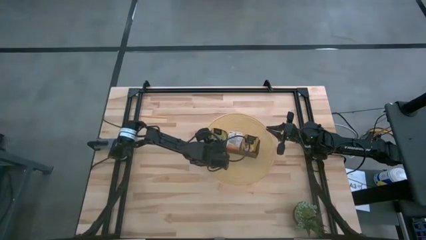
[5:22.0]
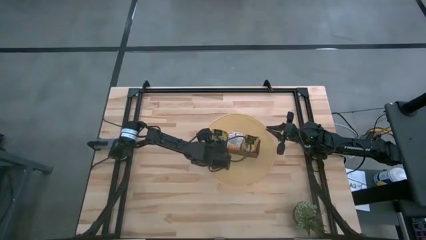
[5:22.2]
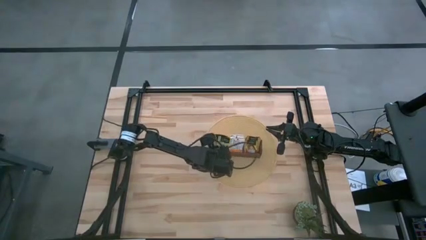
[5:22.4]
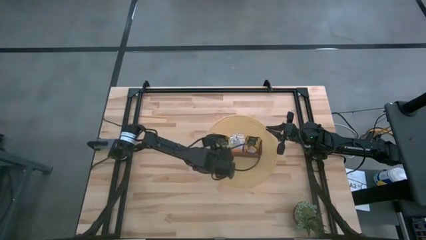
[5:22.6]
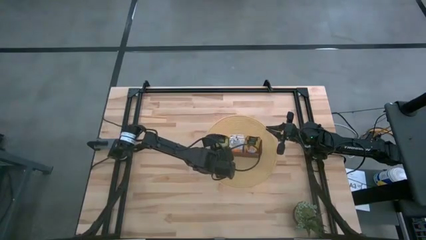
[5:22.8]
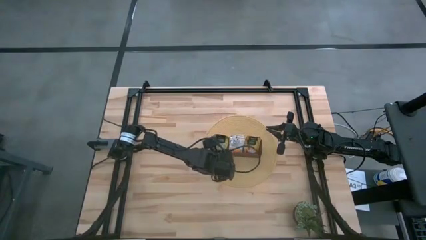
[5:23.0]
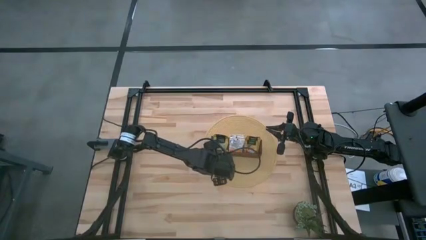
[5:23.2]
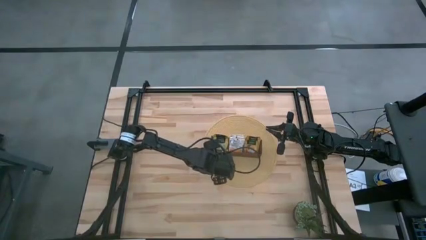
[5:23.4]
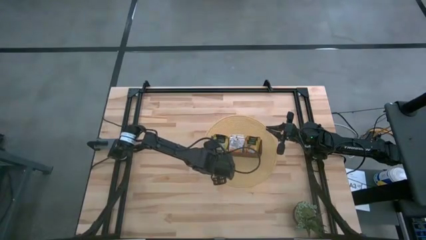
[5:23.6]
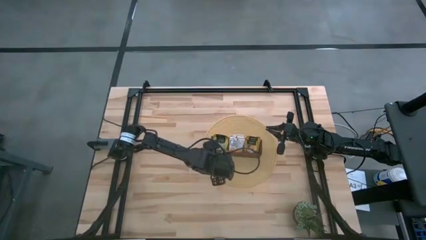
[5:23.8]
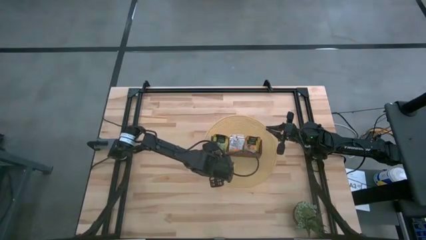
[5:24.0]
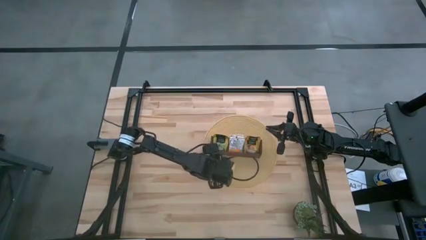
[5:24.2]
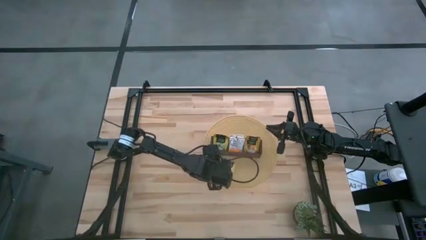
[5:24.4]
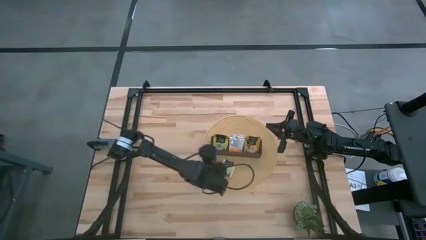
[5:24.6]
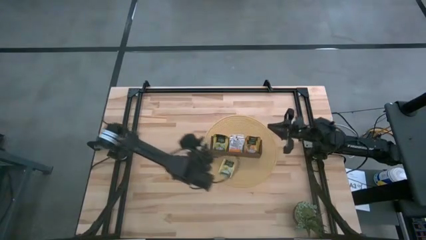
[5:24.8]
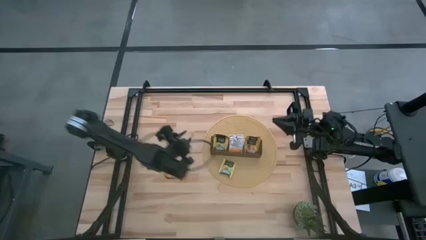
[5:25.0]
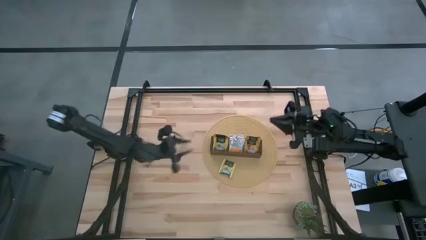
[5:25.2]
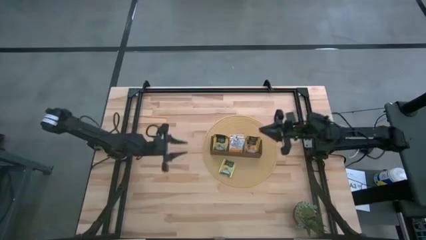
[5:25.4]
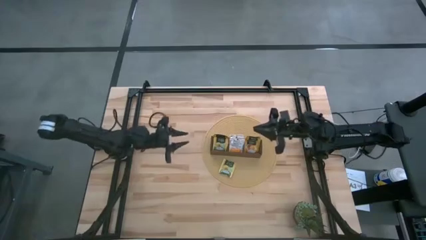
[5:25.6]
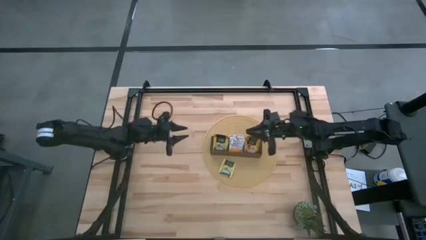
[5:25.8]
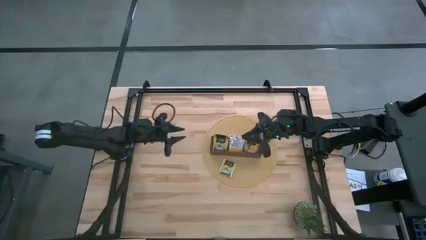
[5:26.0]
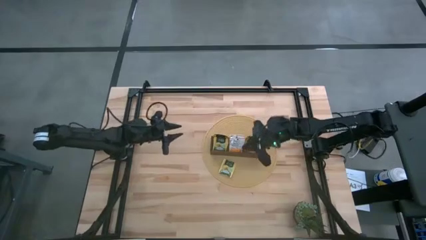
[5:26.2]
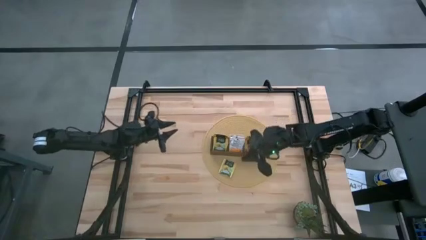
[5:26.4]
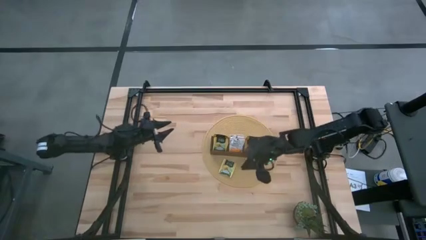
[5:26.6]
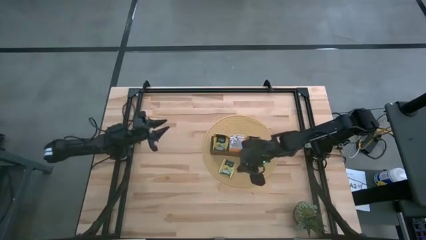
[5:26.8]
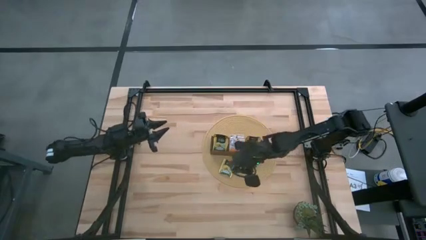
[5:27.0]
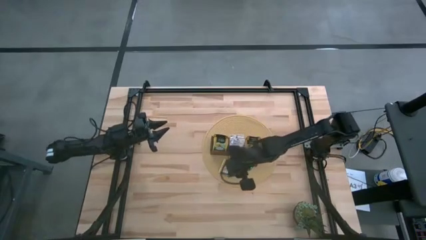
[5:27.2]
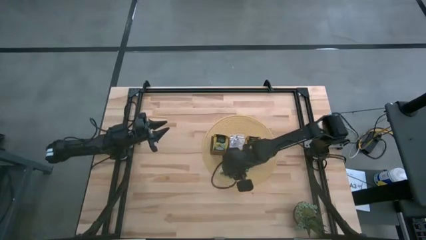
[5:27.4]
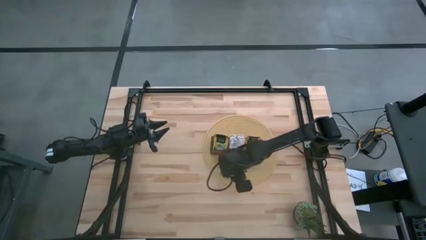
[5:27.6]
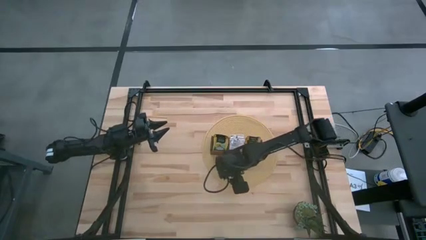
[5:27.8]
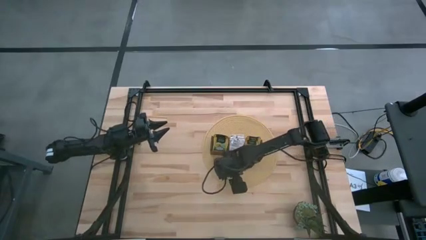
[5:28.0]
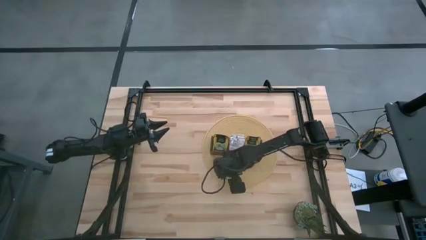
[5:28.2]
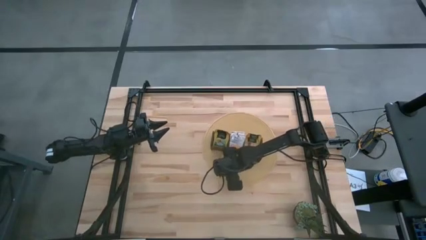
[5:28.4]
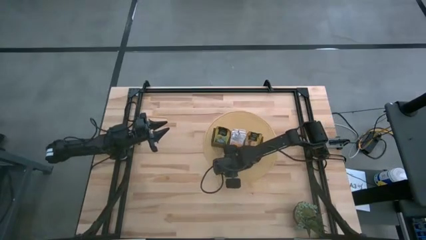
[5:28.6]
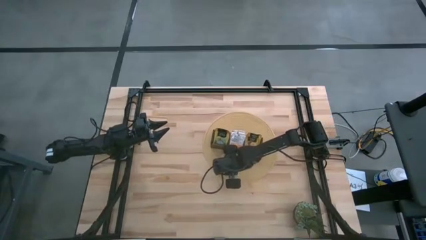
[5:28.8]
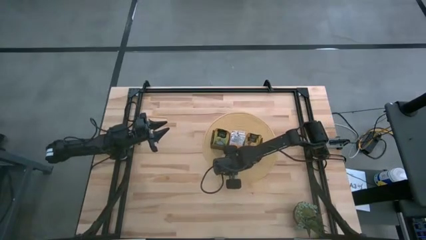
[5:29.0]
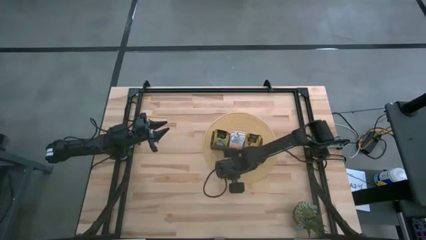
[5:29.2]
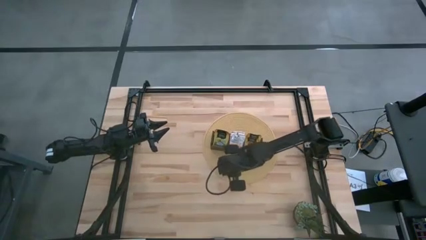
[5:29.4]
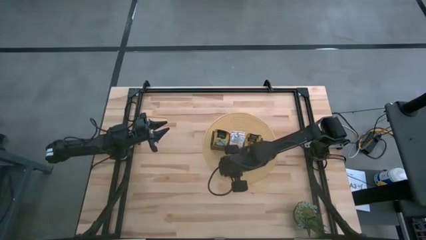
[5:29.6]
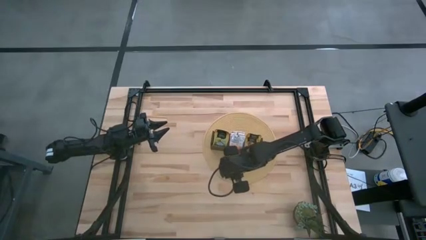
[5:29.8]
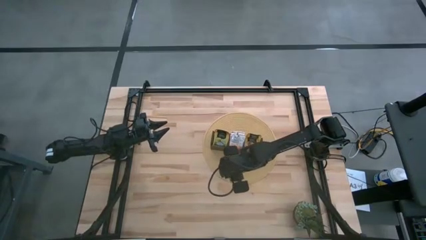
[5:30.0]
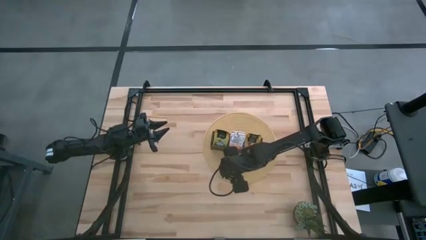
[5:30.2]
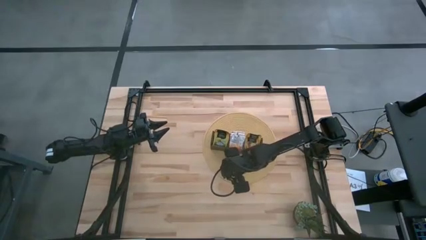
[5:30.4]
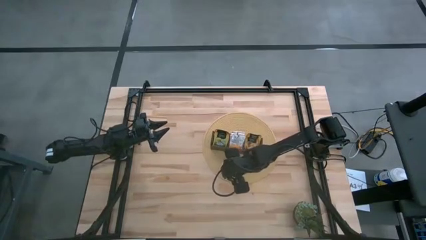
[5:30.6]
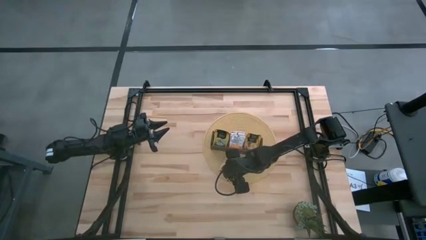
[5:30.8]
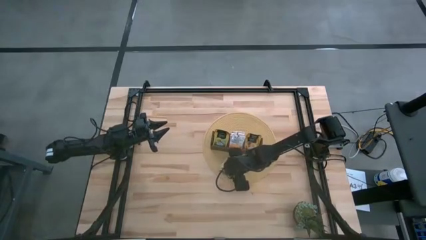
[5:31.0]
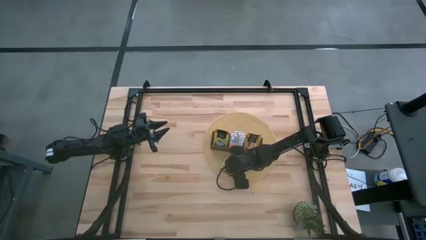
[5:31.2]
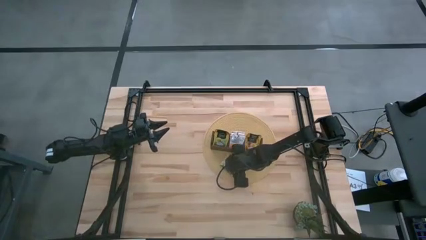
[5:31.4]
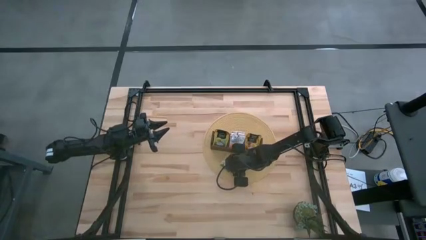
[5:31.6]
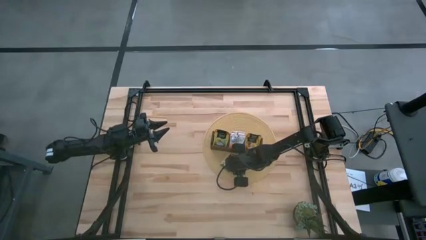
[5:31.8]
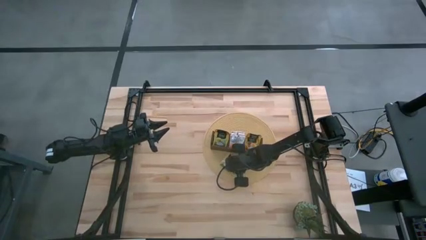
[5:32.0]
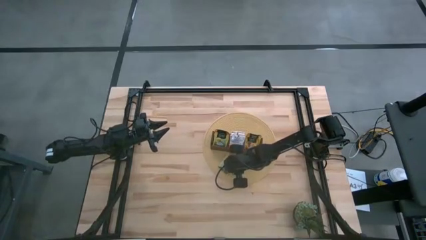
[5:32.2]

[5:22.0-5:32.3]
Task: Pick & Place Tea
Put the yellow tea bag into the left section of the wooden organizer

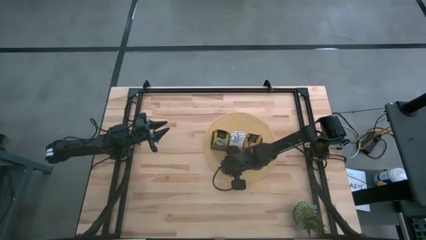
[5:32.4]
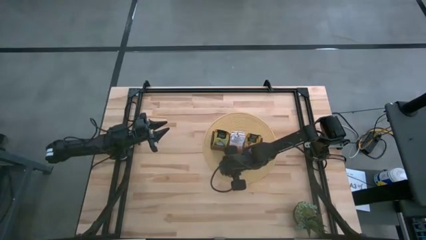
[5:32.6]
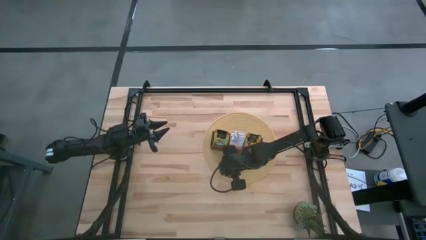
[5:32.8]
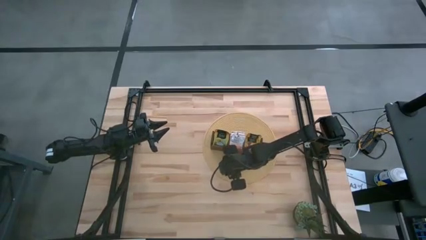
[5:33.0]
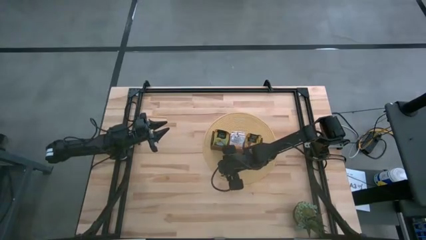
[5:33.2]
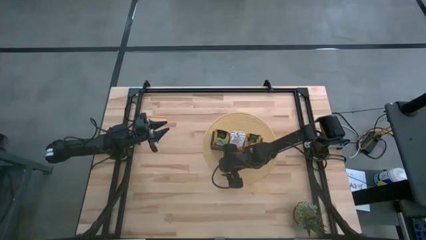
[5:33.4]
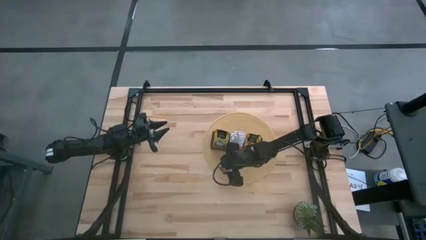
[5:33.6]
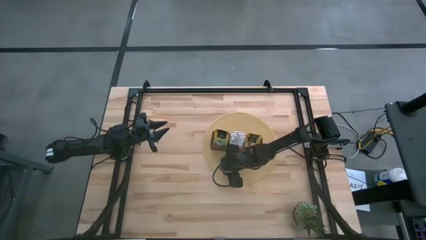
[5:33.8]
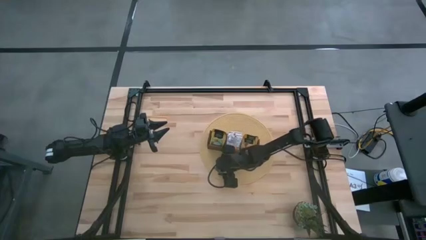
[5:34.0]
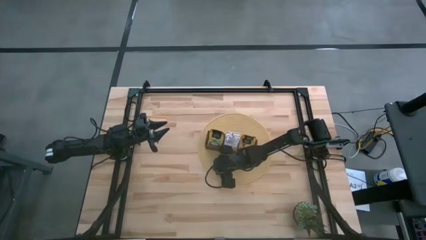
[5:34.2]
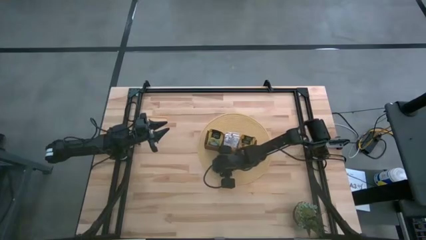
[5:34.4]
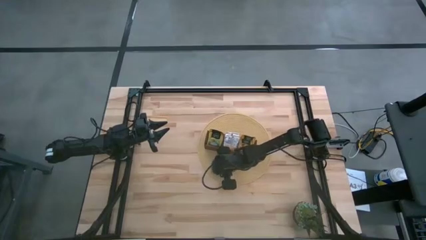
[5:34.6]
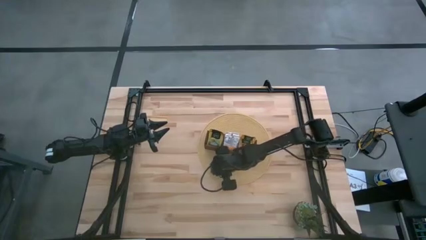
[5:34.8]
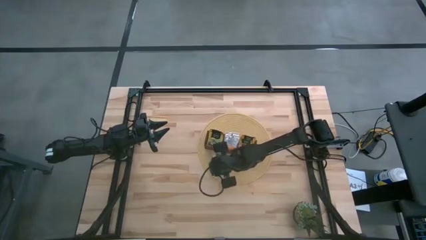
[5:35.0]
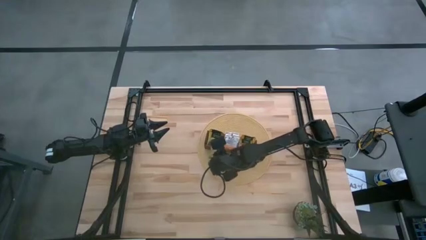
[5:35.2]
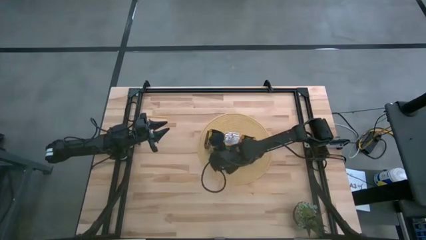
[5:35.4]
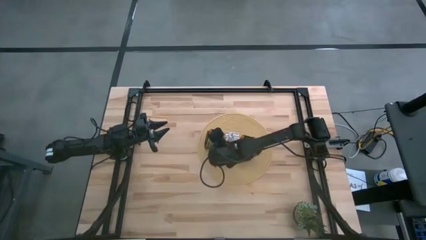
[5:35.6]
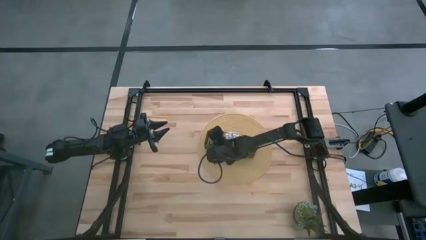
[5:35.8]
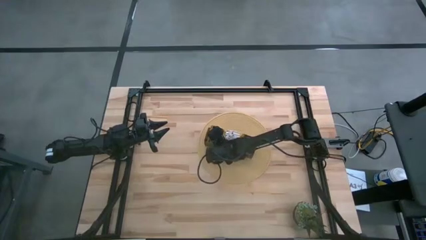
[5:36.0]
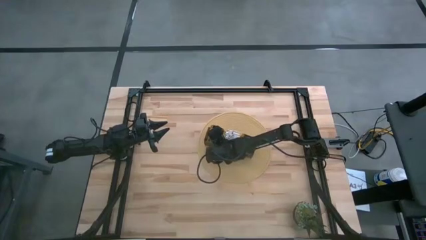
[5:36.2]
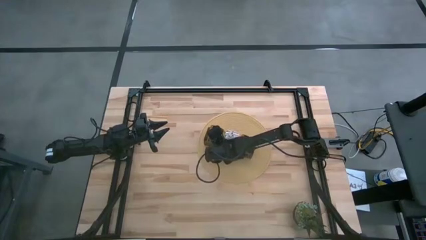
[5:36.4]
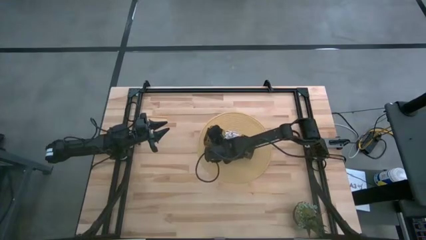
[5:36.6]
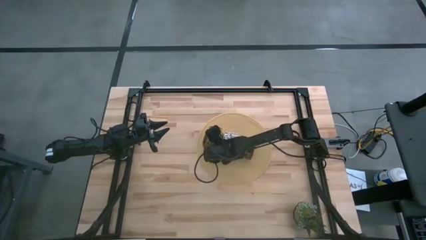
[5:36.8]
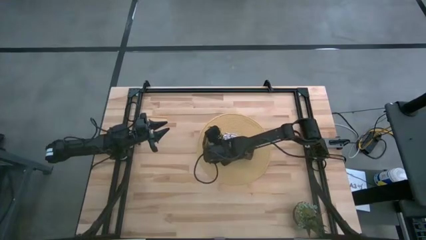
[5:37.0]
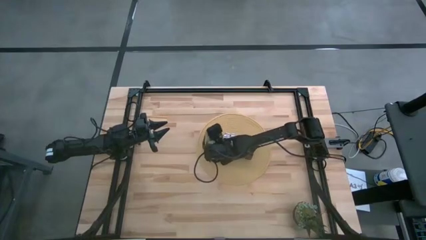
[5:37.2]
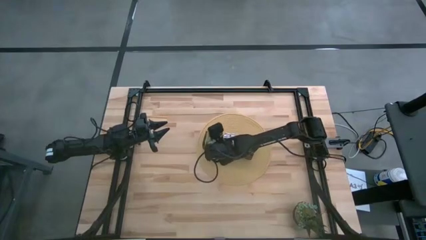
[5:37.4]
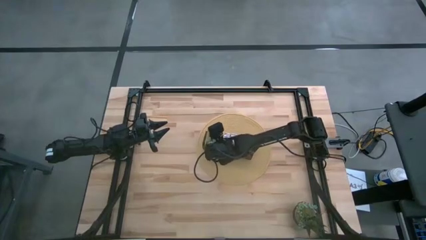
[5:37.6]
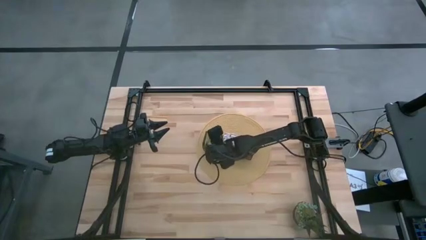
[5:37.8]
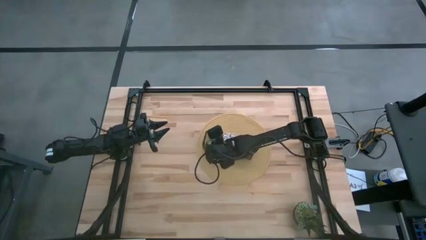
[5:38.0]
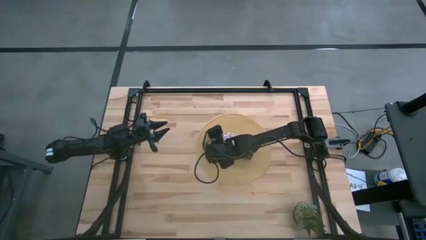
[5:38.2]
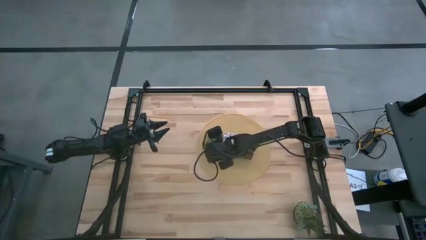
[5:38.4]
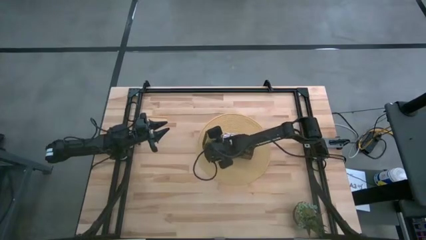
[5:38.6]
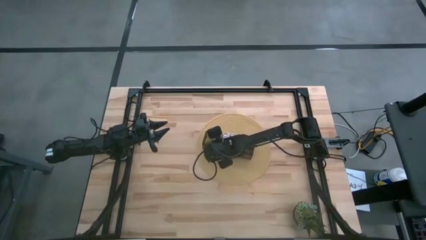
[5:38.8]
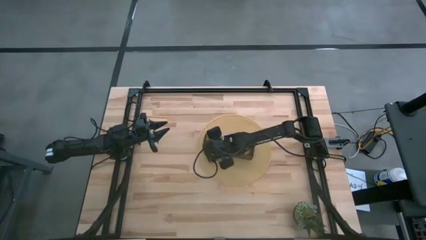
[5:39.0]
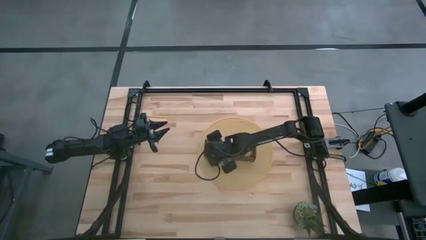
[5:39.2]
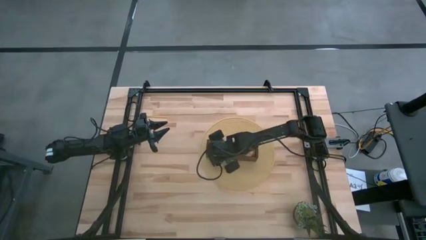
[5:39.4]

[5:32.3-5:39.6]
Put the yellow tea bag into the left section of the wooden organizer
